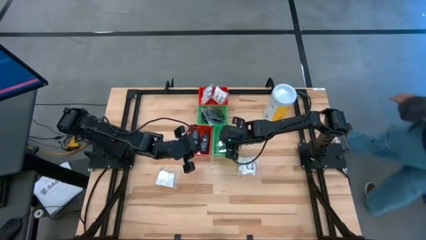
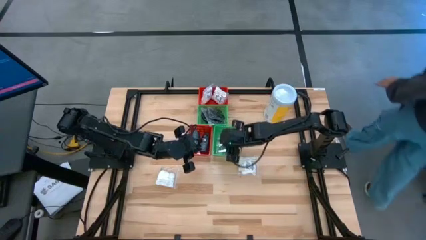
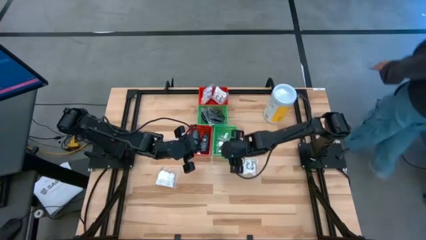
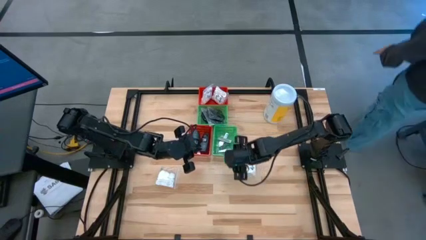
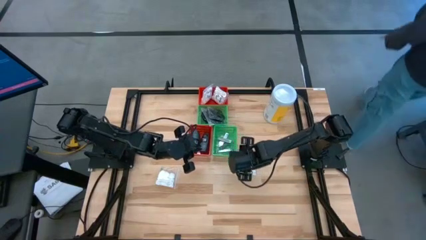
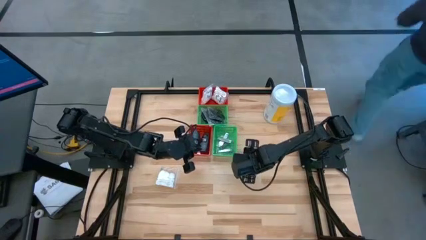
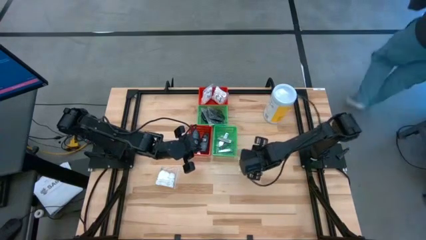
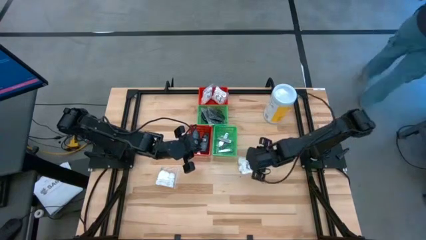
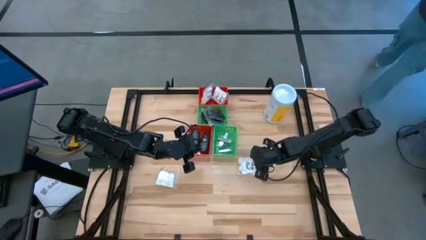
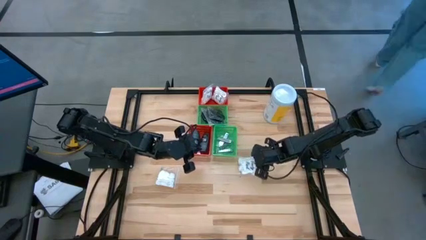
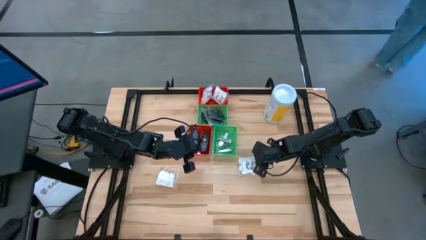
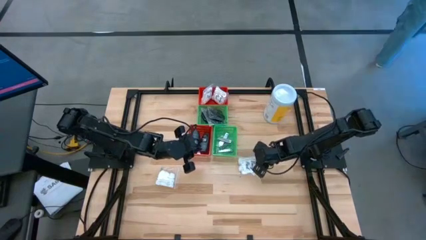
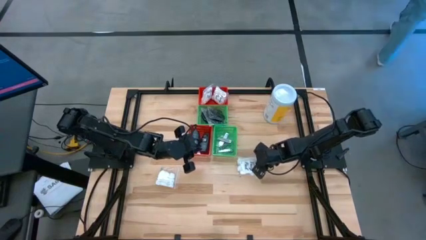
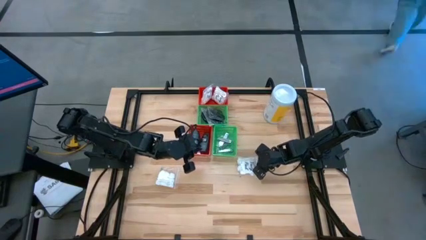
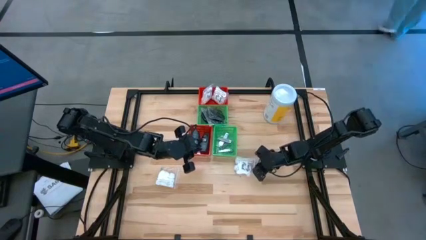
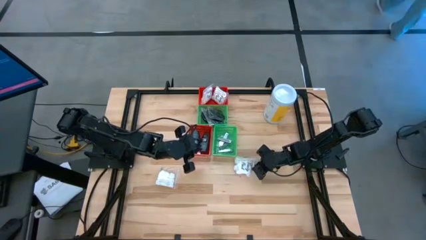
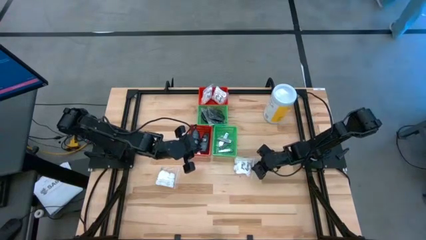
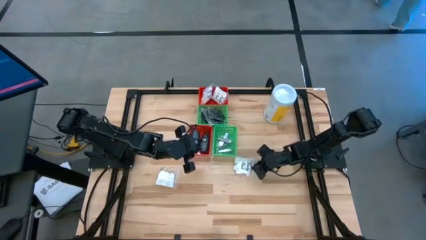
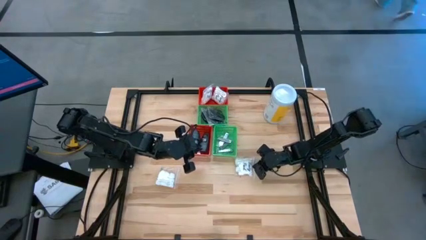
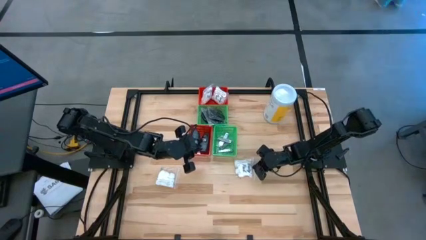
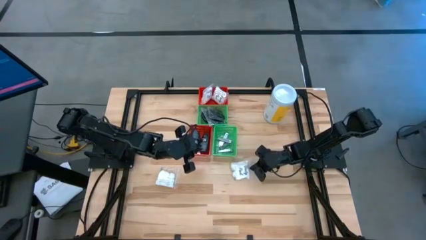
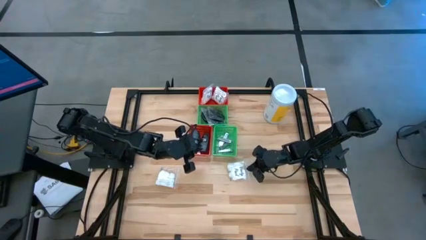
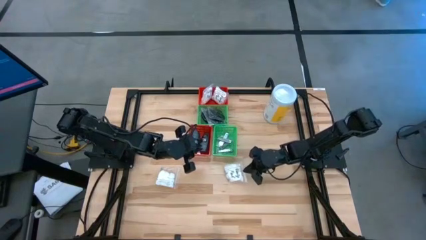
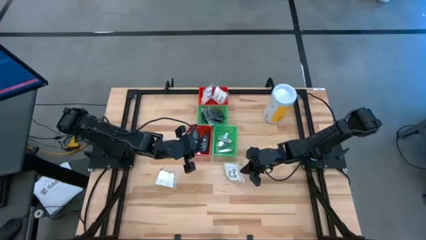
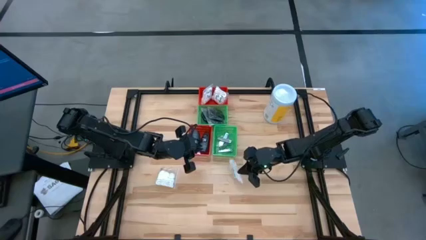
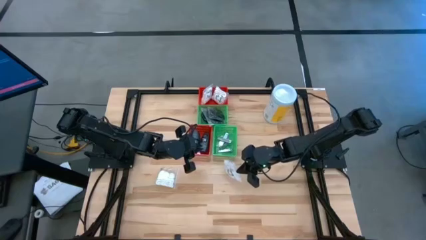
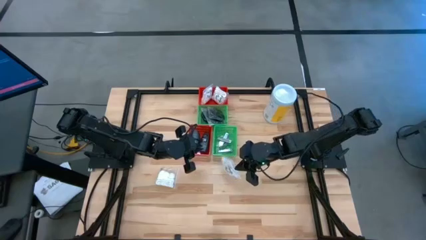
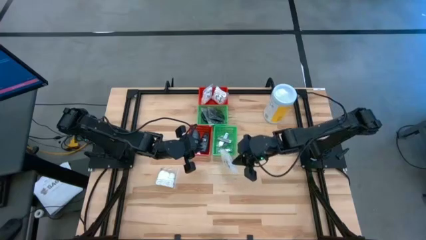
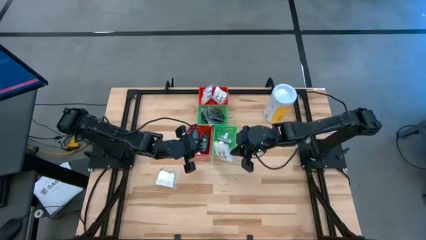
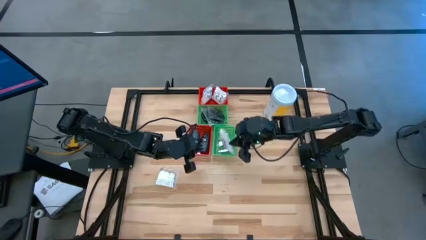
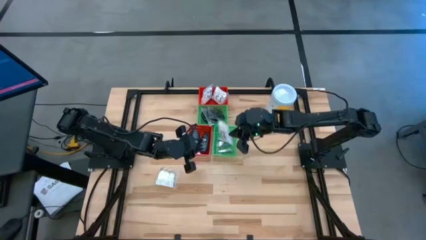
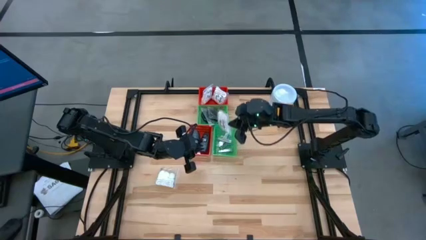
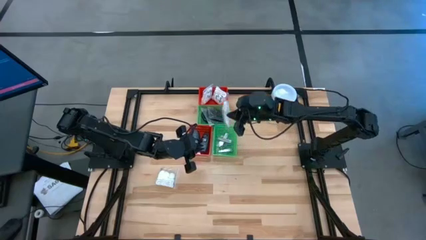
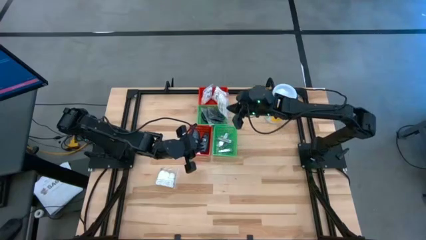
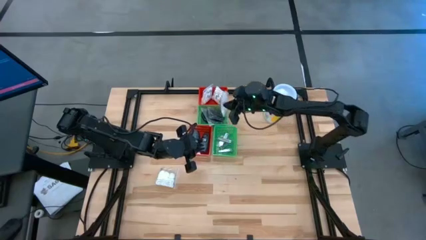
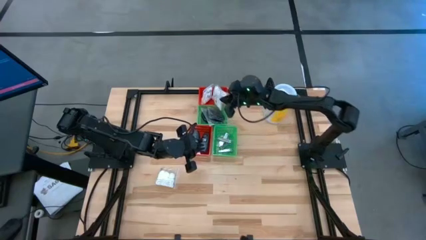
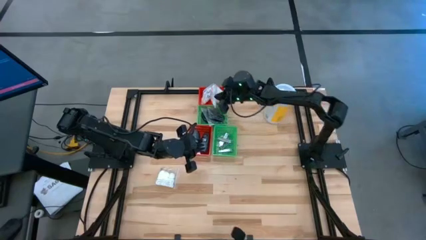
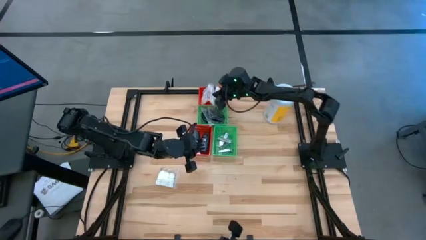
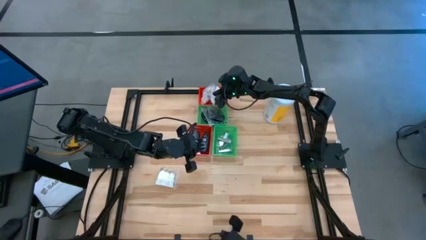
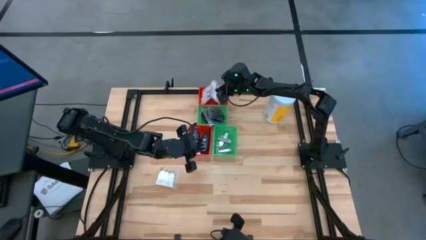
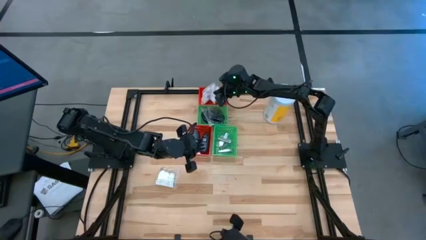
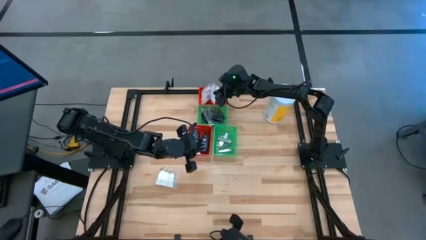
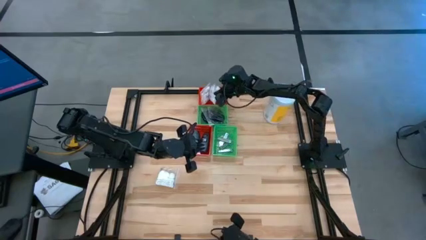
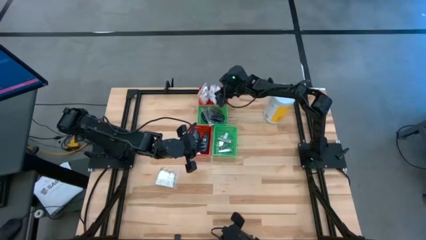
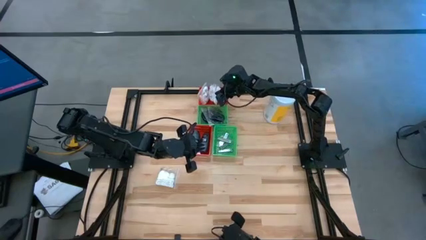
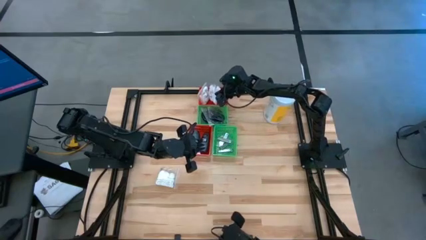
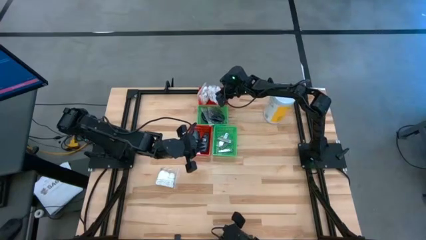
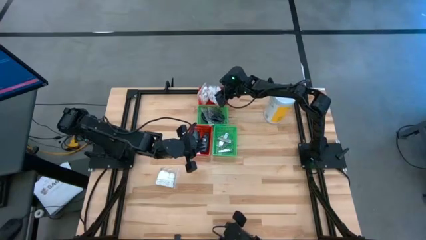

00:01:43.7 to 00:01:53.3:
Task: Pick & Place Travel size toiletries
Put the white cotton pack into the top red bin

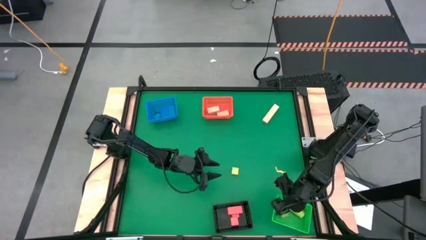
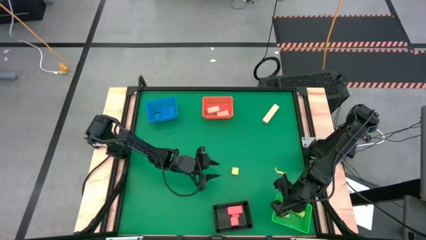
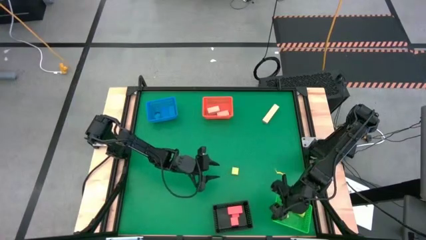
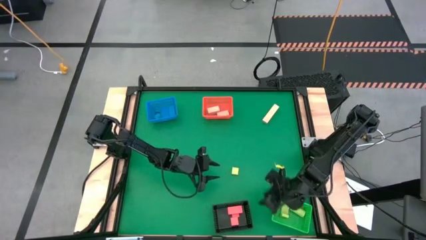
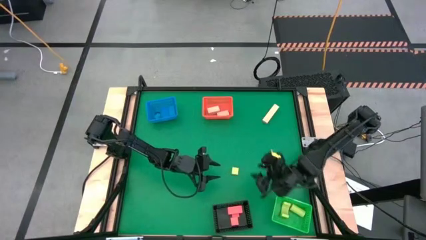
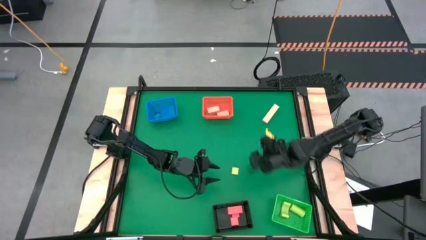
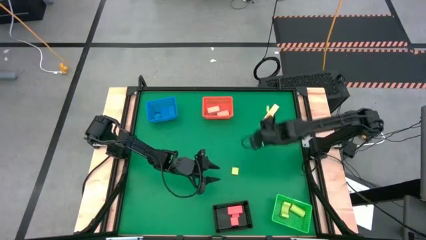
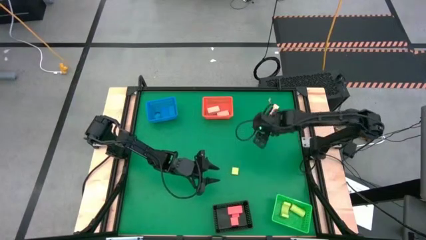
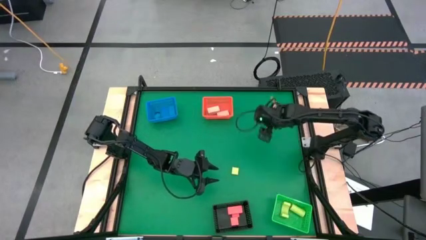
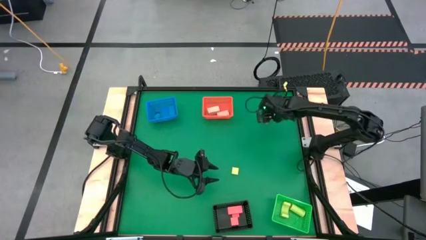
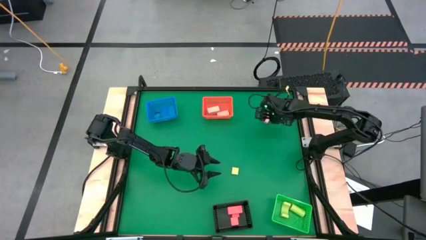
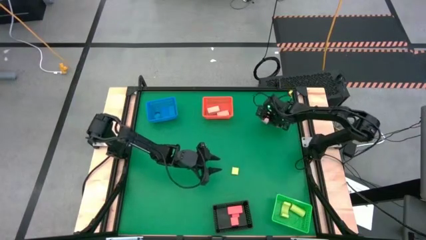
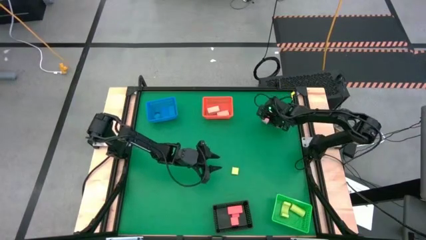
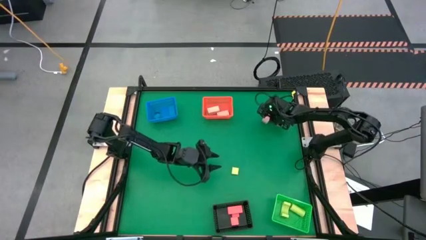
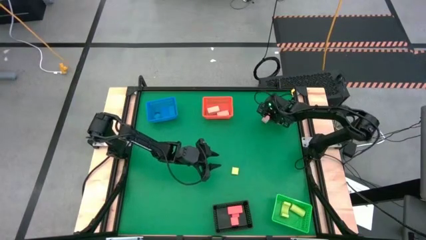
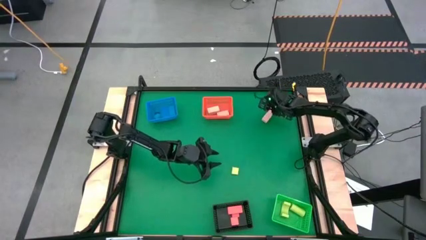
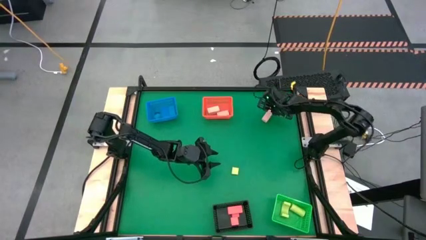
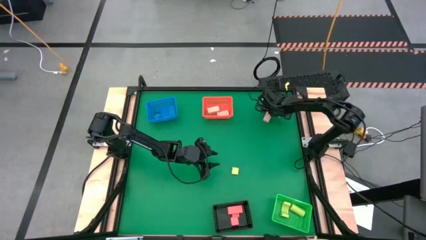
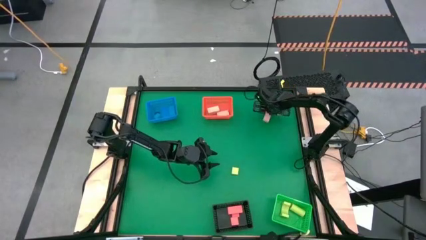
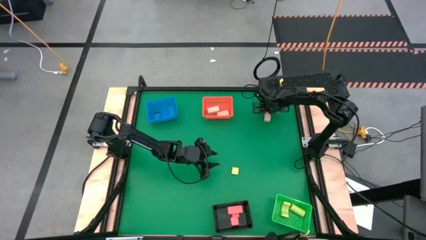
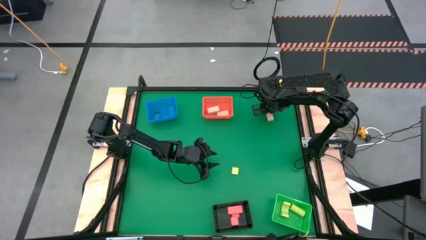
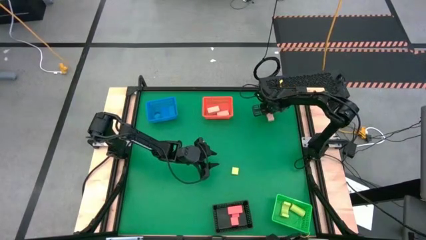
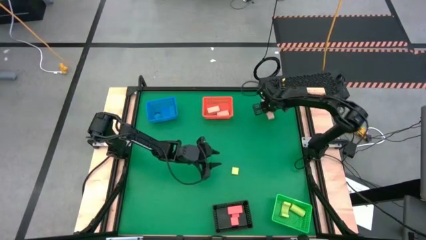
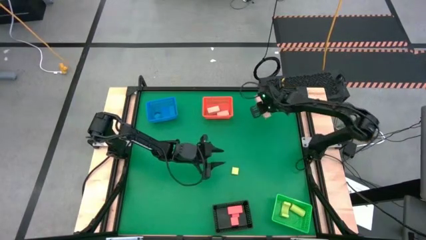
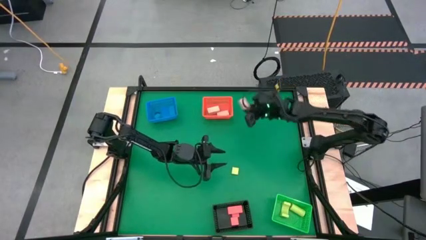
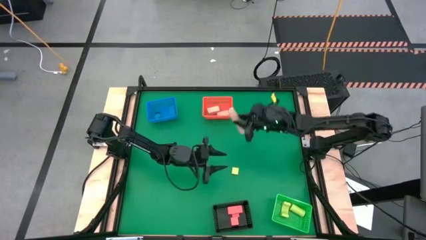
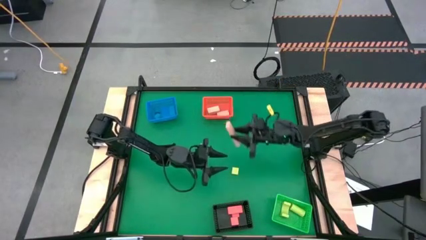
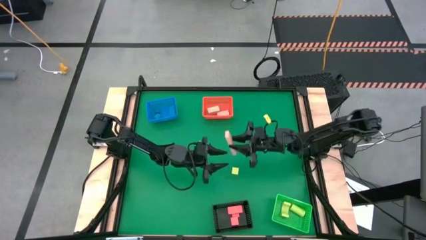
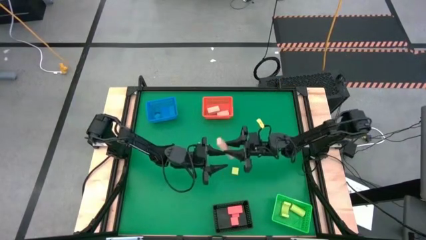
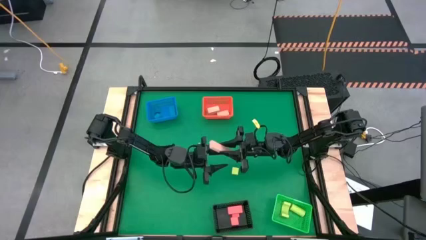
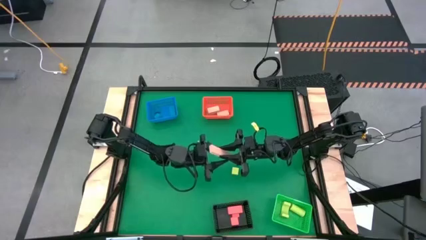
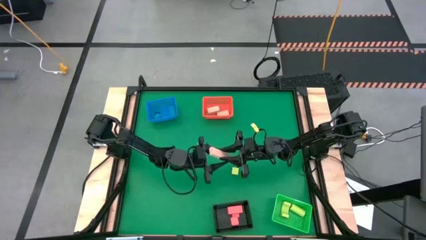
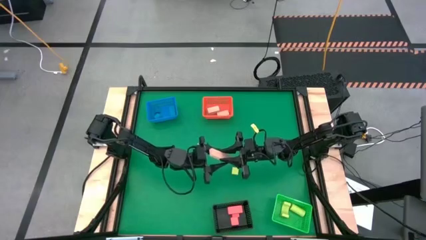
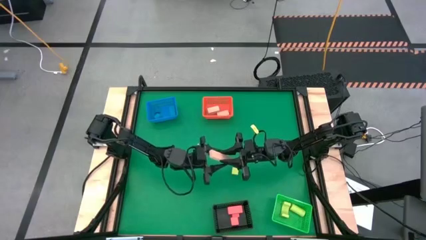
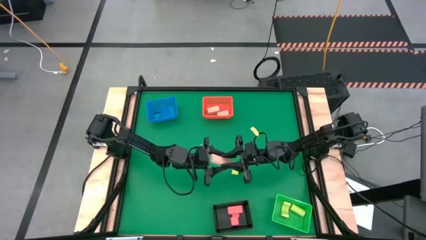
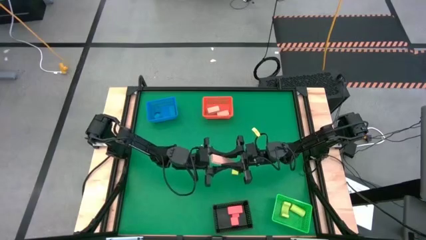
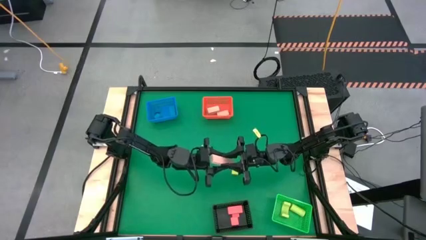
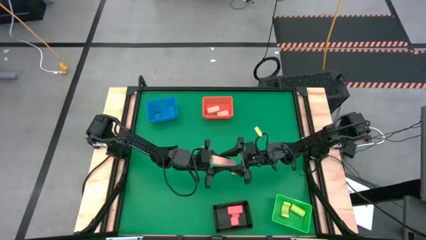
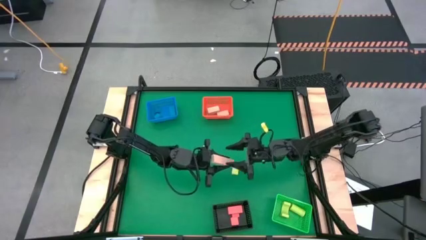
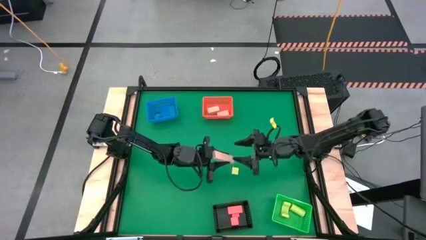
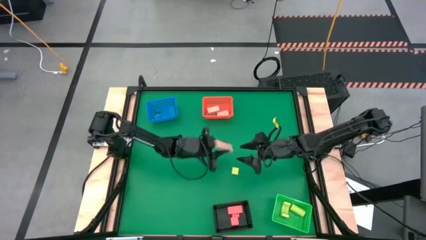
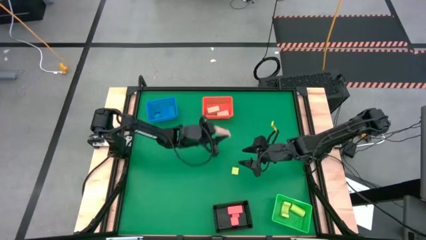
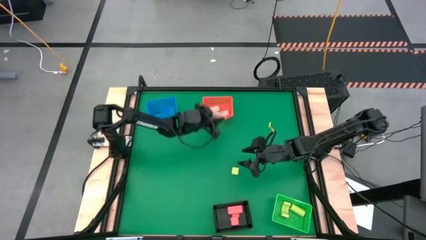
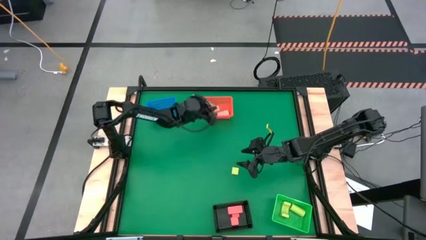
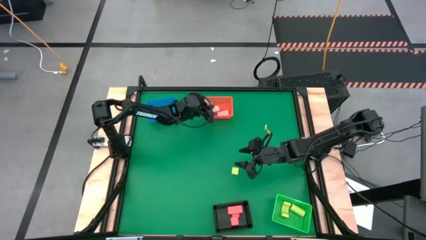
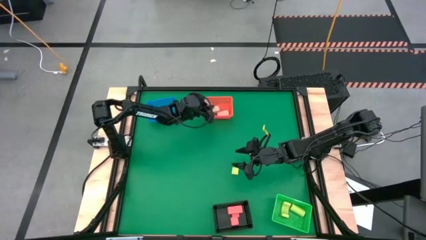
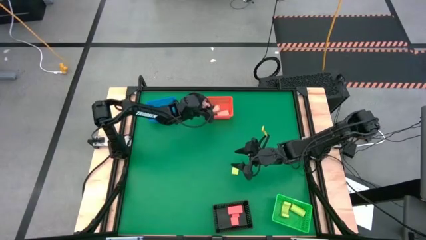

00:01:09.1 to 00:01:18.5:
Task: Sort & place blocks by color
Put the brown block into the orange bin
